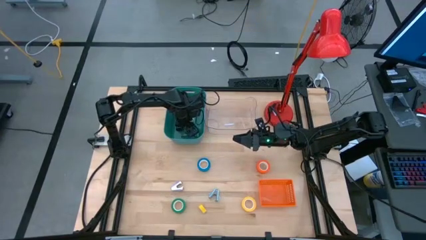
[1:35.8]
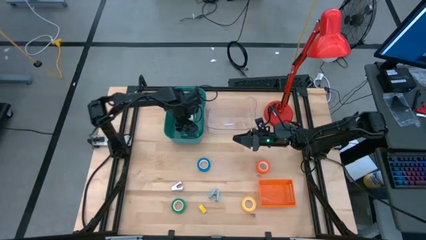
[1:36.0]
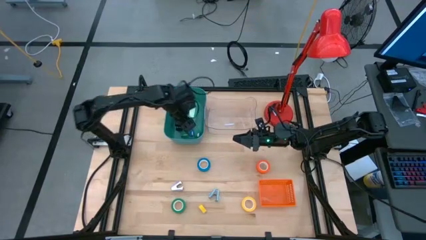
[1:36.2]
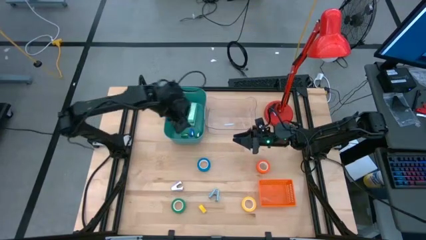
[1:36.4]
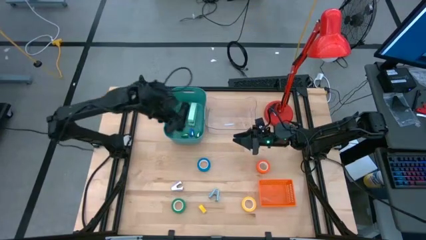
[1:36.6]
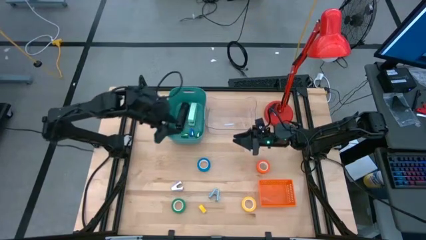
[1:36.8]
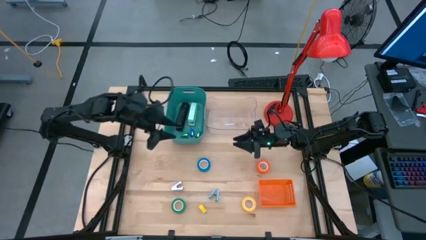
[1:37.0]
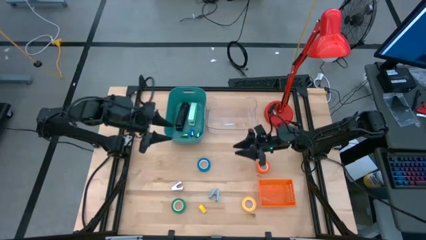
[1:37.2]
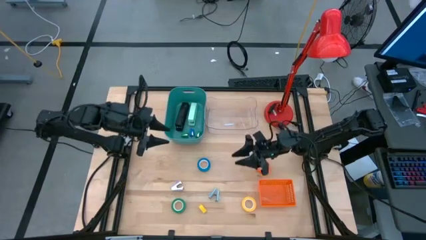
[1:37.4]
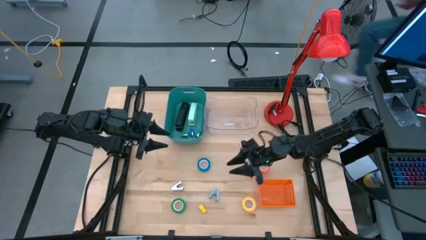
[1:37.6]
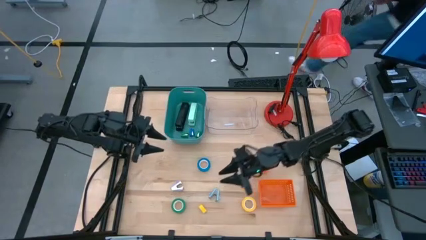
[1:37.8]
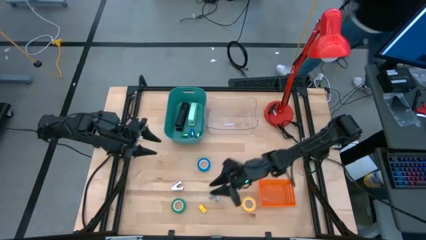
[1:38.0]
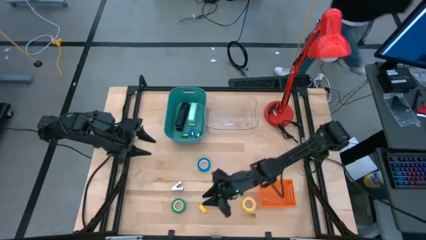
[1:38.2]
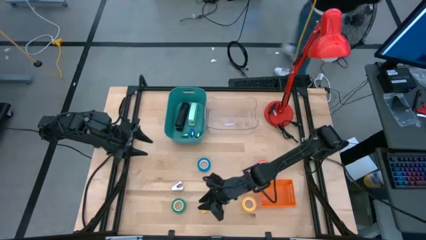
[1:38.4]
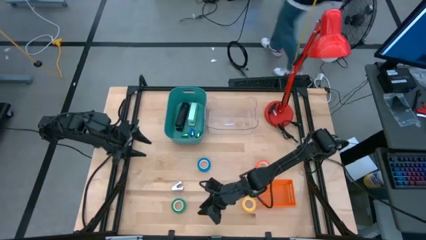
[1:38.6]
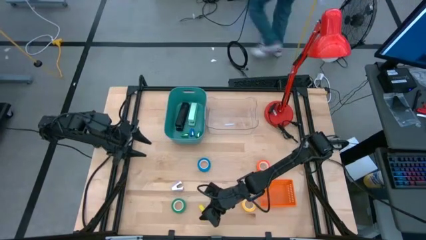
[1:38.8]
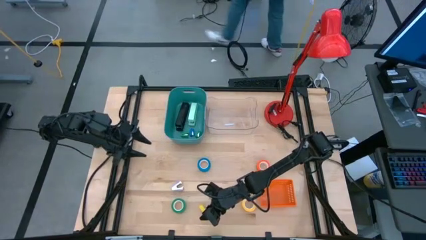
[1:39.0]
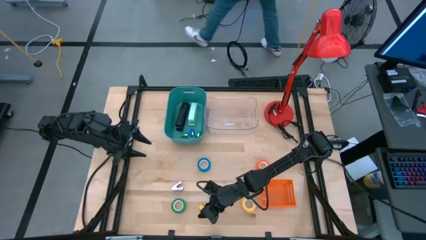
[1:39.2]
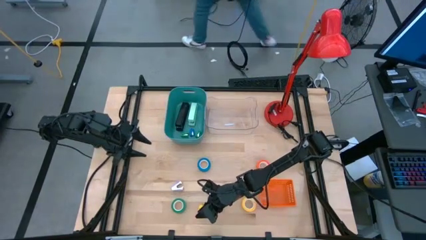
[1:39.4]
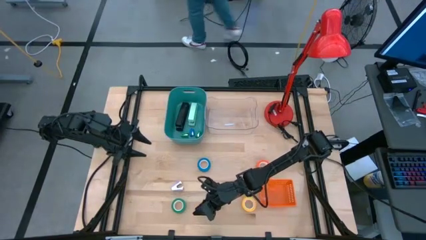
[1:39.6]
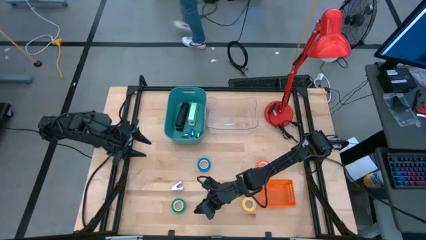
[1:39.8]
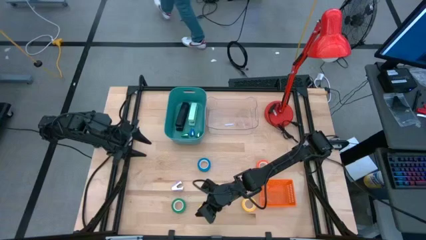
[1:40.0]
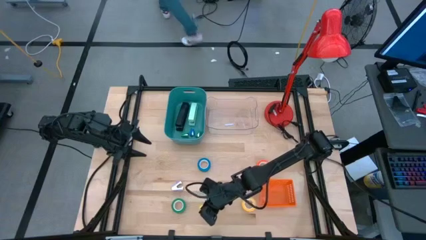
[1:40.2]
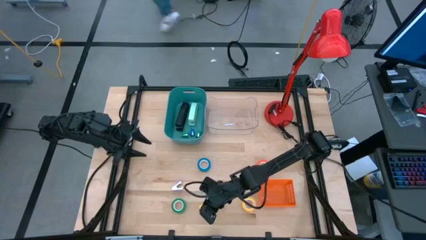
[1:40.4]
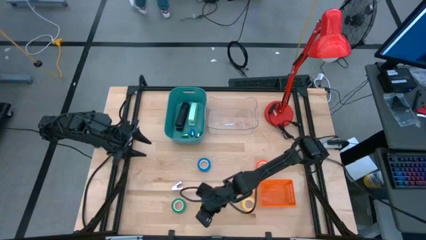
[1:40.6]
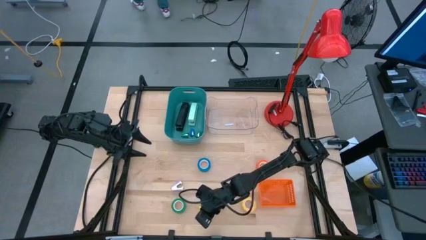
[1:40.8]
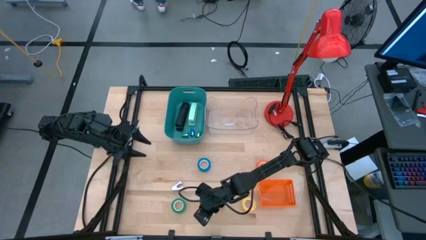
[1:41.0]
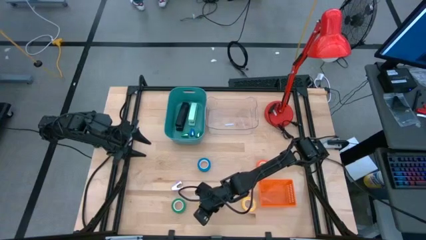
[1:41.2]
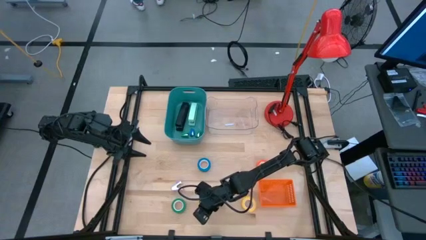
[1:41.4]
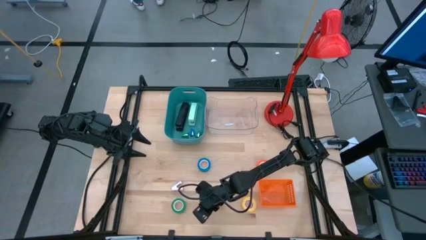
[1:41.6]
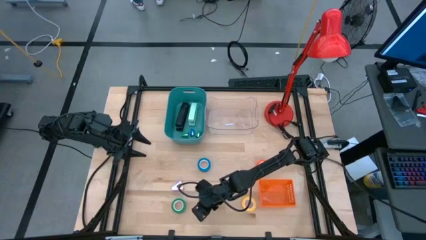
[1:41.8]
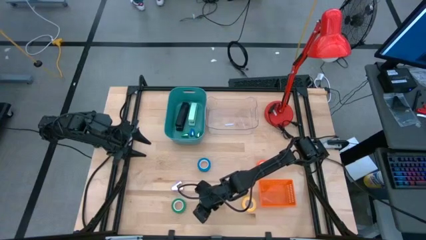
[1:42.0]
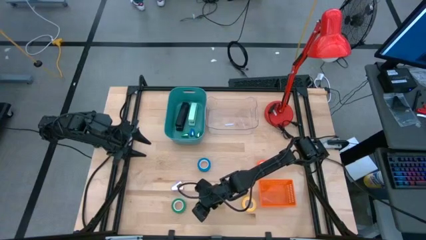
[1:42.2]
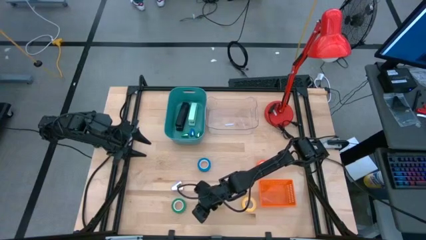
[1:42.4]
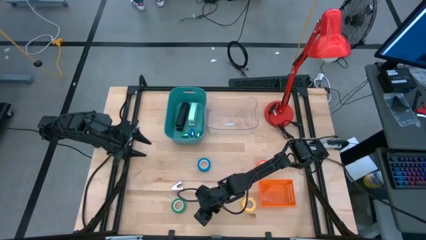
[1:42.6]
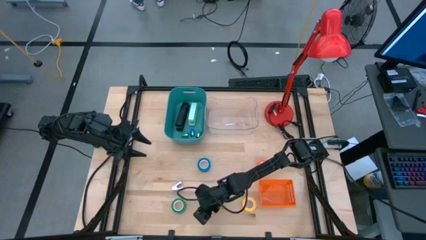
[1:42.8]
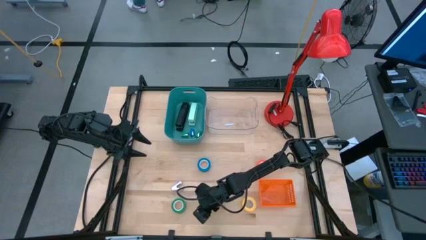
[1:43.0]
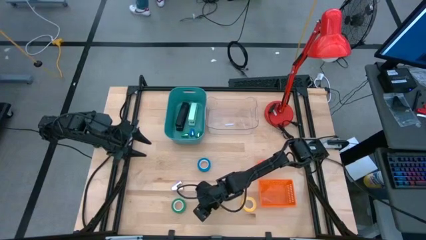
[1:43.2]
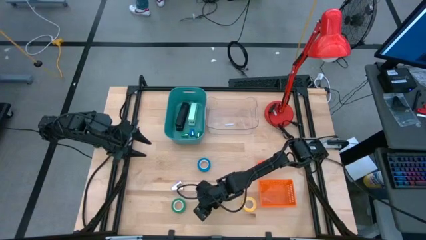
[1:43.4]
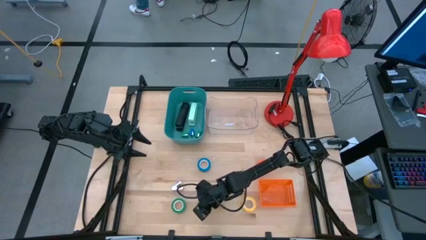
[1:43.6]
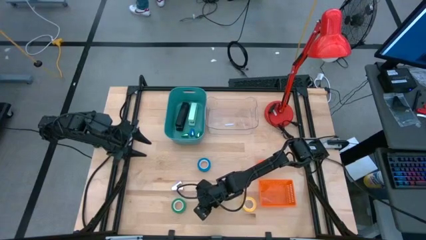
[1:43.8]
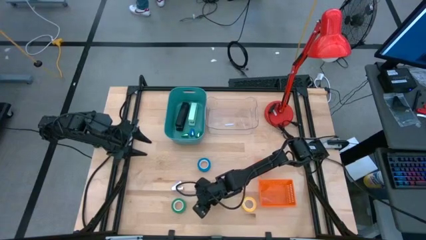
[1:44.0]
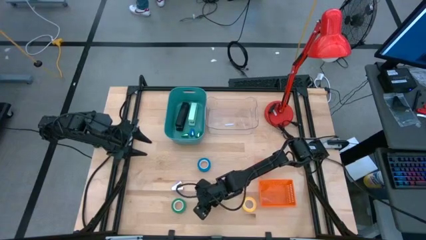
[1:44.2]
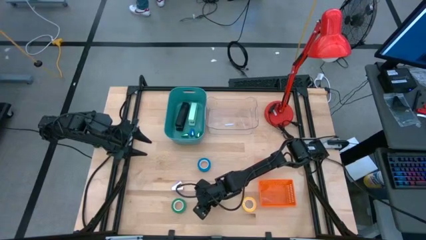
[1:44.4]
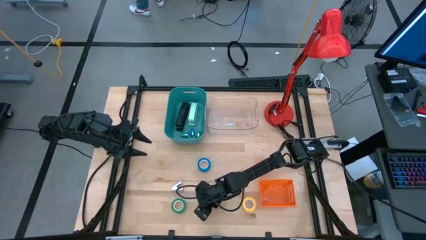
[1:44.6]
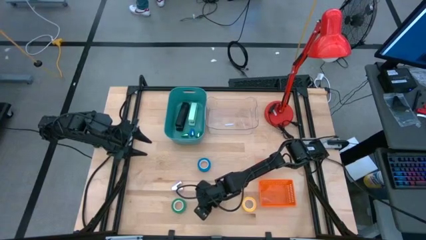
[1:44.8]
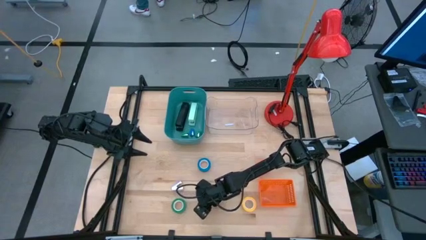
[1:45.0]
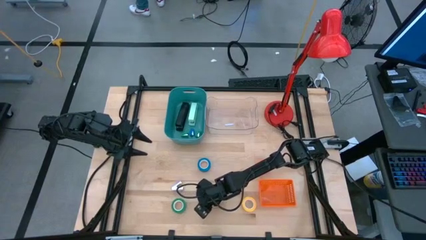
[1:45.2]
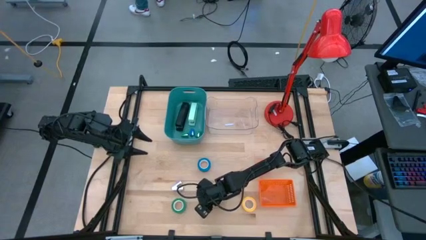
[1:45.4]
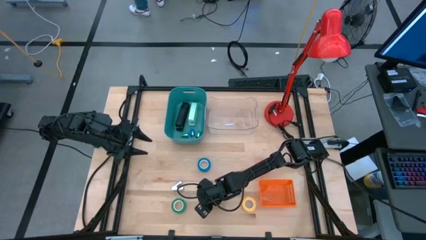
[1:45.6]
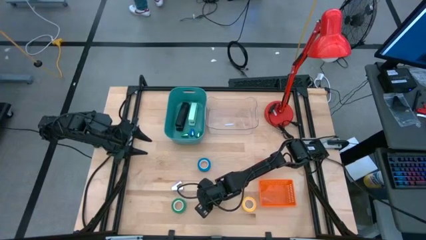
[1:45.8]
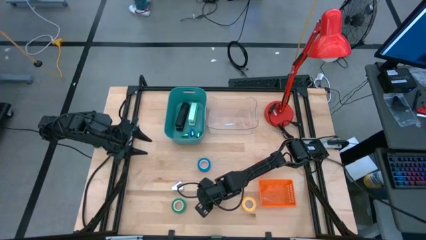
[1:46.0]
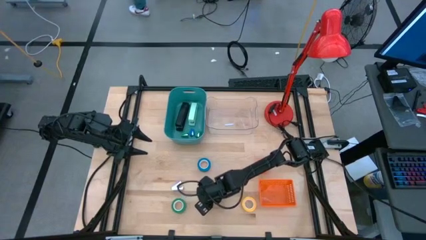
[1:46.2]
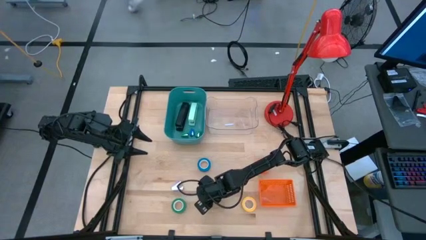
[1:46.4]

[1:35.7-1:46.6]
Task: Pick and place Stapler, Stapler remover, tape
Put the mini yellow stapler into the blue bin

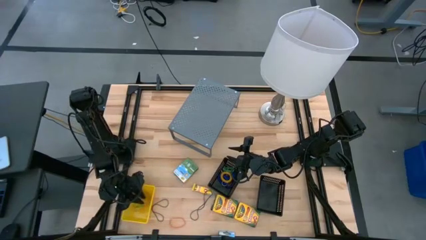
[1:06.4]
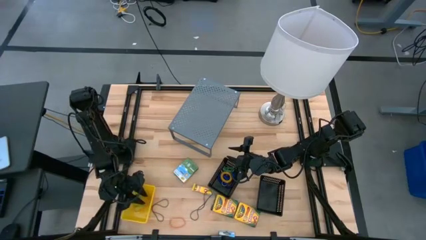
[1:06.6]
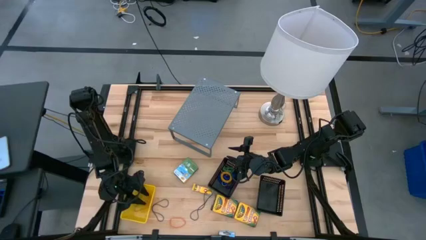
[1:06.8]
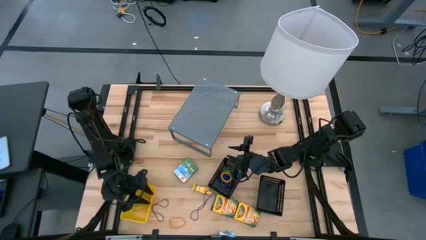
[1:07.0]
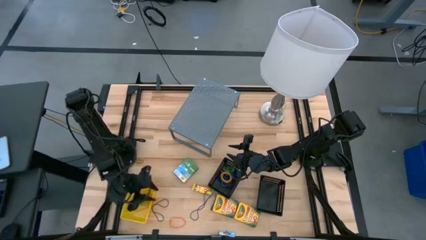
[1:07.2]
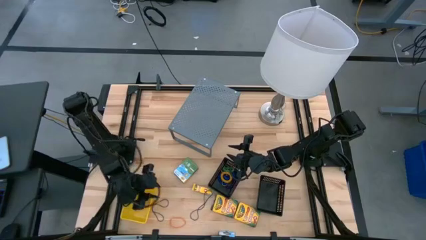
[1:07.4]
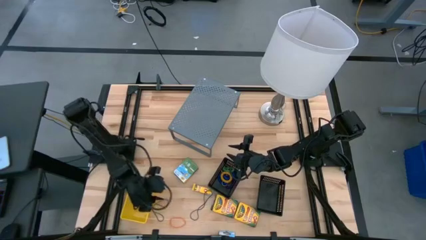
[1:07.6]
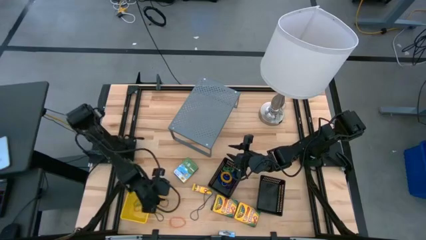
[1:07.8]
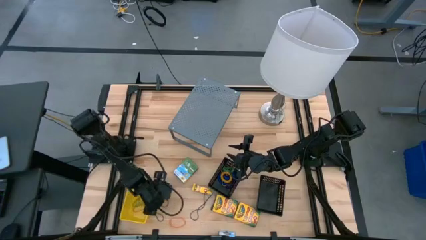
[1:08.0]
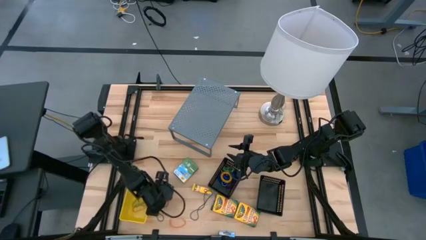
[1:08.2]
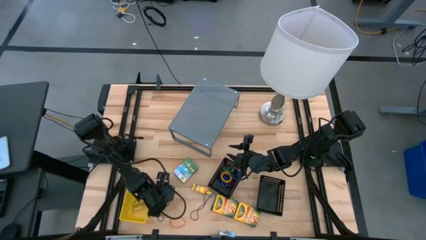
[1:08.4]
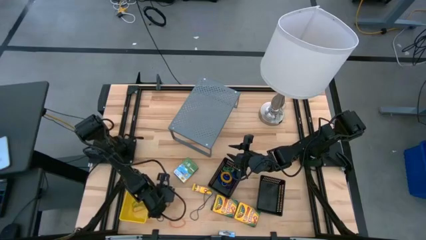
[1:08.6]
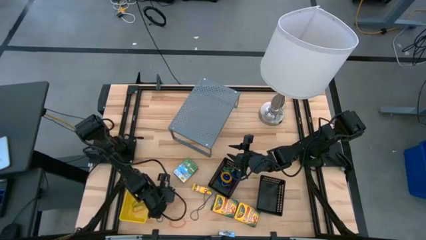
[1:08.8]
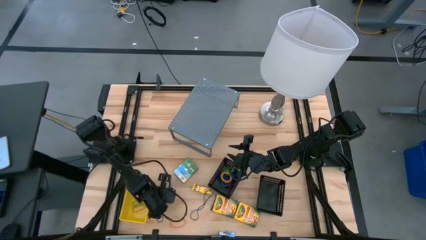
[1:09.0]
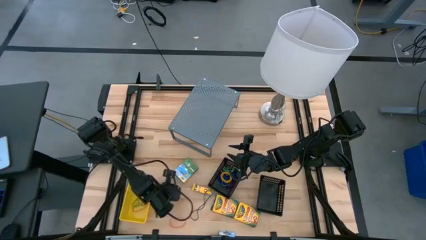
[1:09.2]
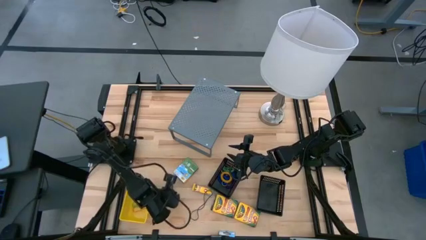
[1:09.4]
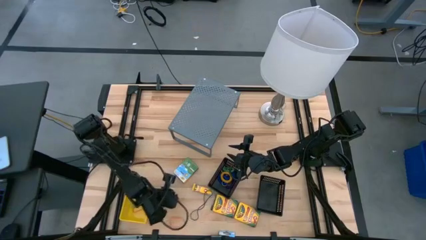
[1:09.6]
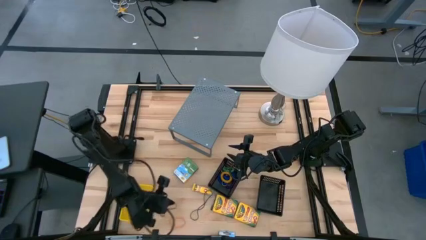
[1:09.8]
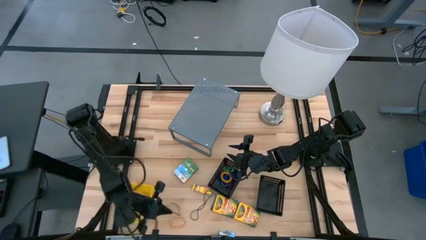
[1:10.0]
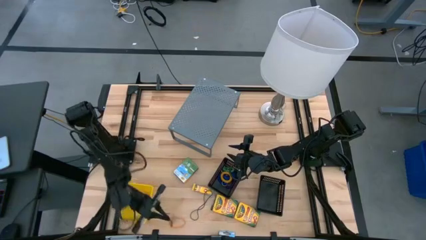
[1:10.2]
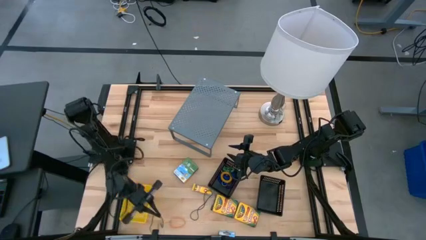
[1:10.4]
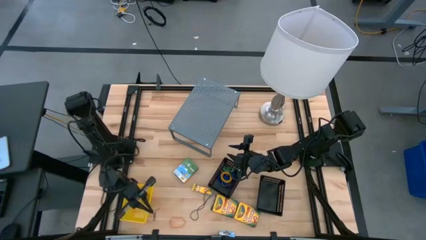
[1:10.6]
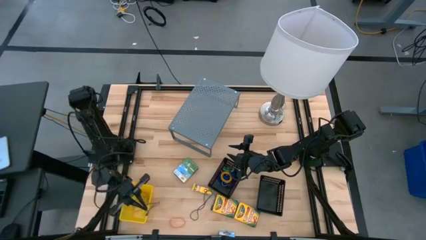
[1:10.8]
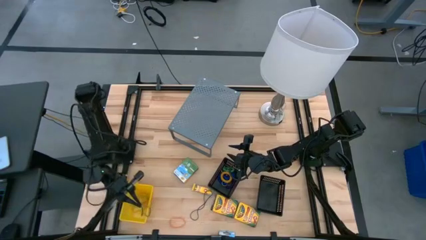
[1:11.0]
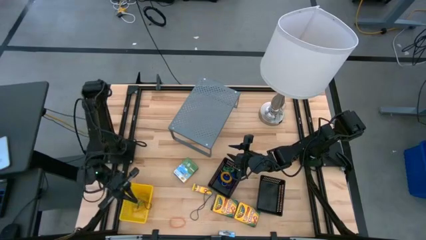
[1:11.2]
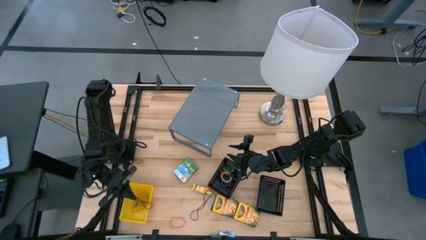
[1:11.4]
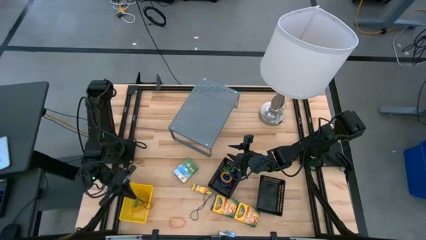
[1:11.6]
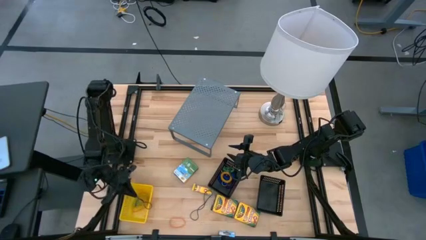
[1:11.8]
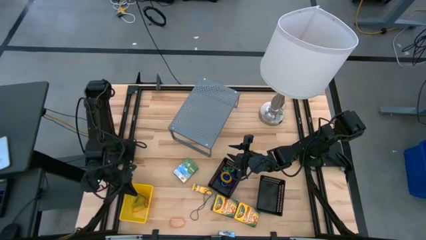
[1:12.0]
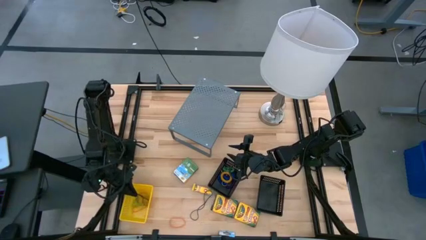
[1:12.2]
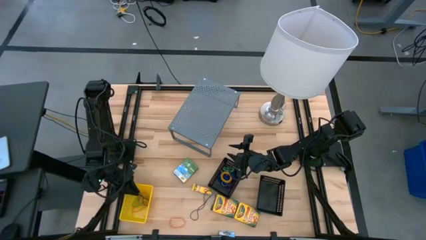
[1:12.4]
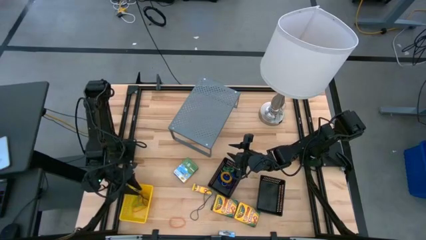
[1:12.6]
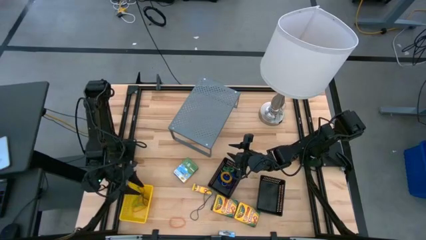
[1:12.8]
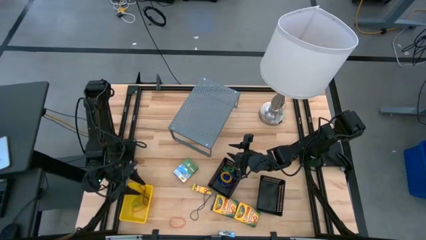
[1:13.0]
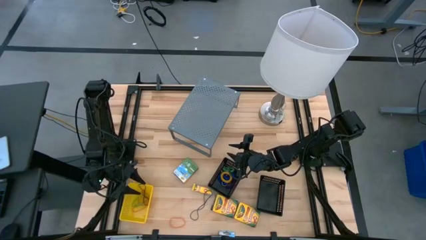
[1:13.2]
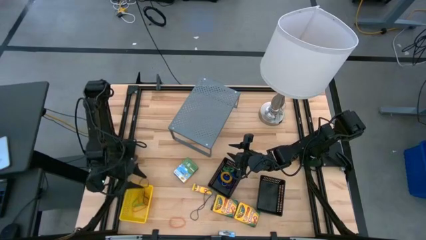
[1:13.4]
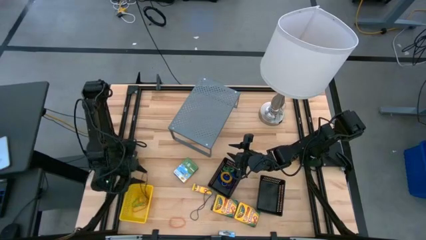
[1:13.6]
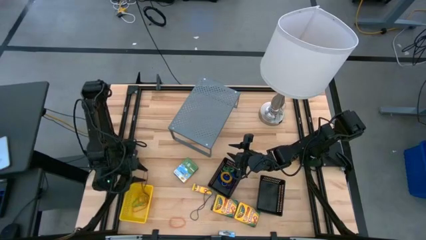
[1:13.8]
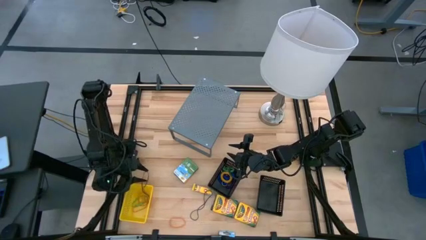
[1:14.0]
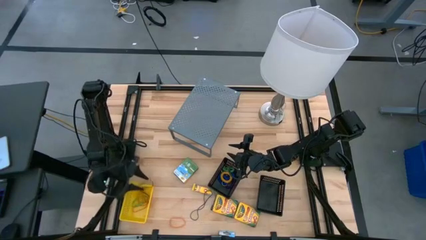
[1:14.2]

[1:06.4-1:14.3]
Task: Pick & Place Office Desk Supplies
Put the black rubber band into the yellow bin
